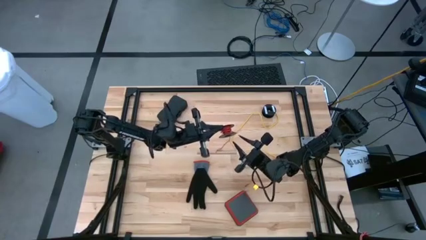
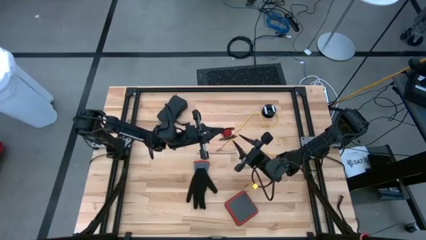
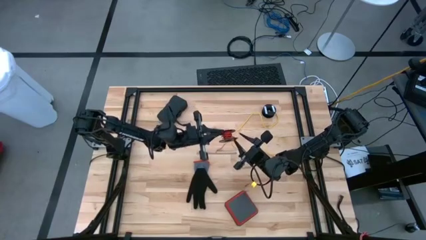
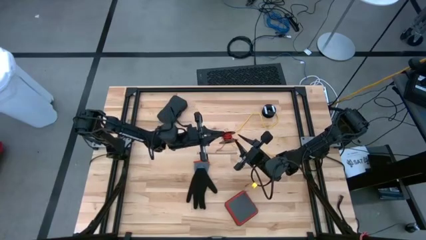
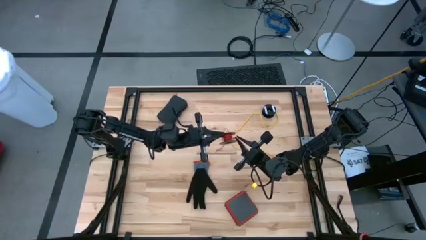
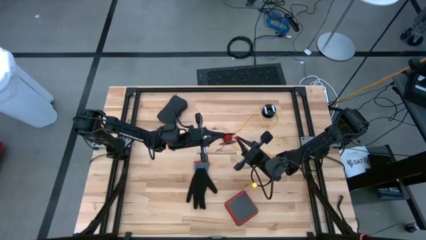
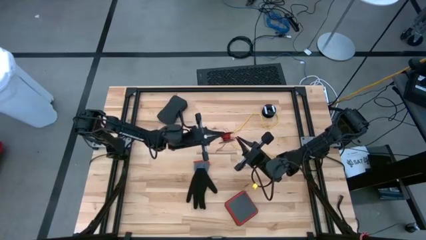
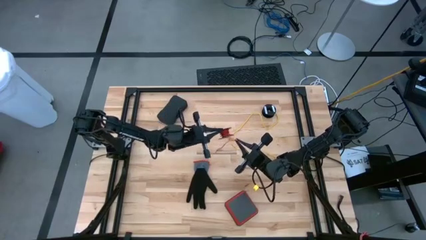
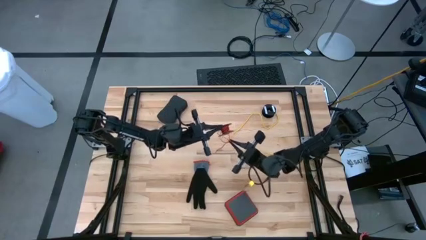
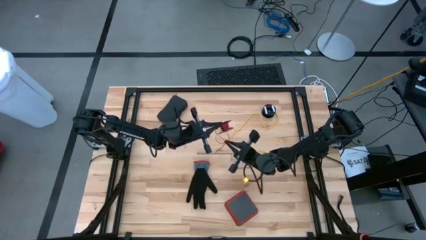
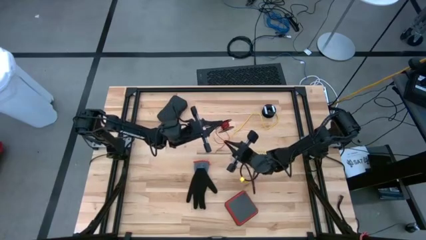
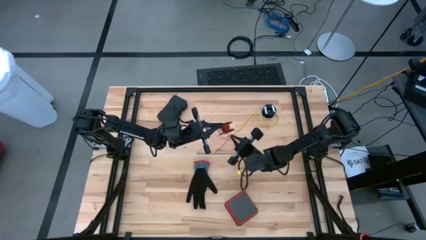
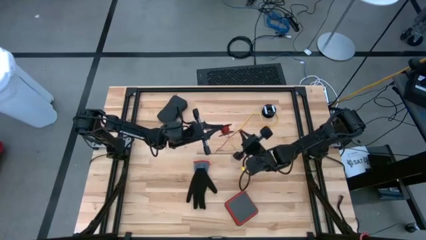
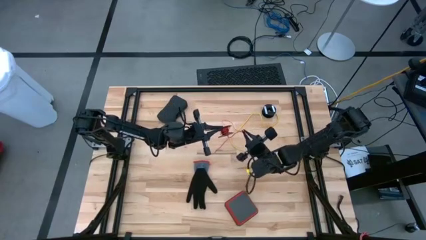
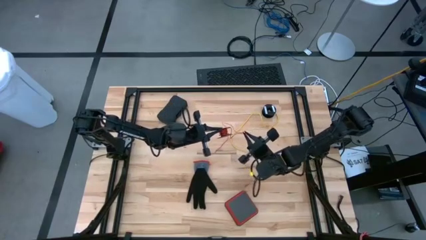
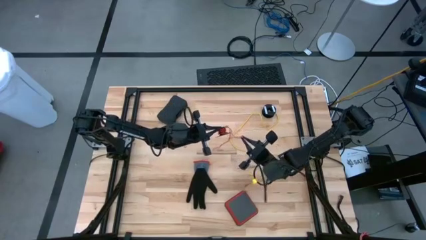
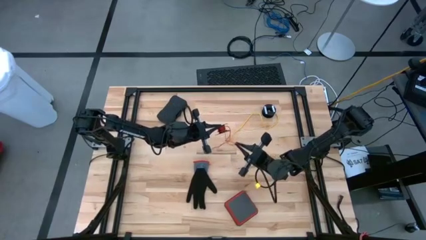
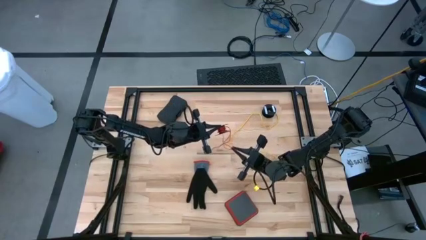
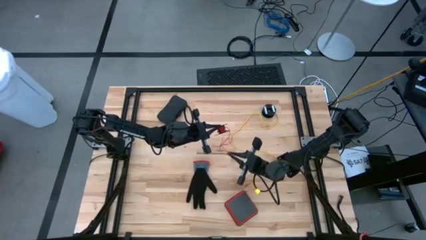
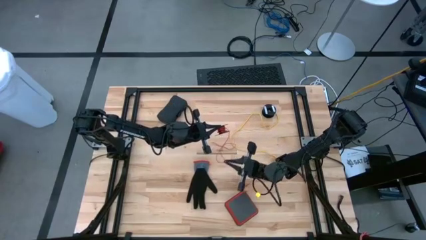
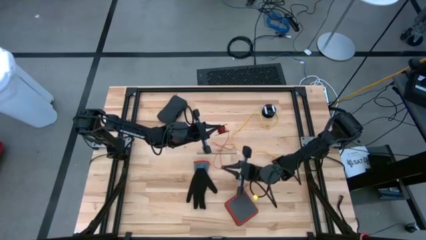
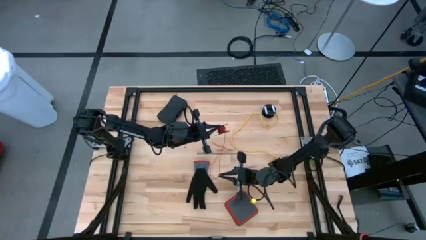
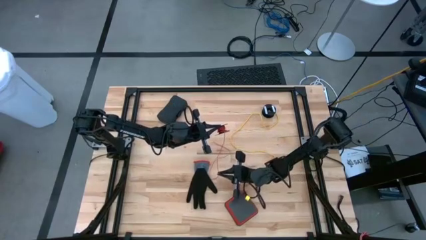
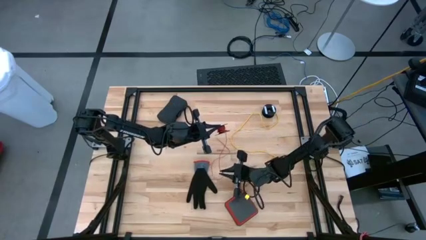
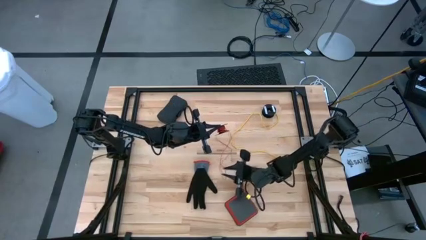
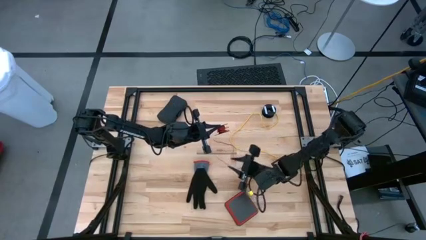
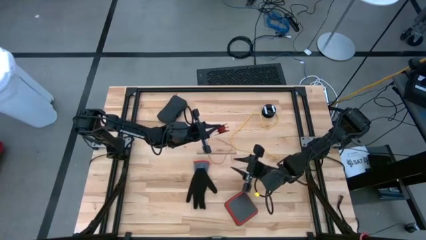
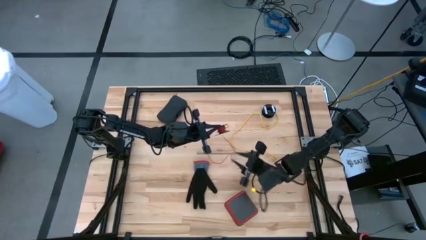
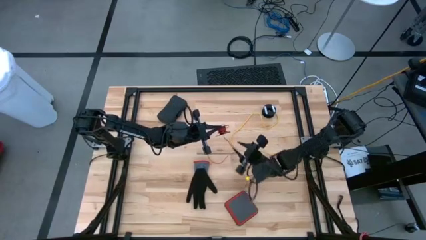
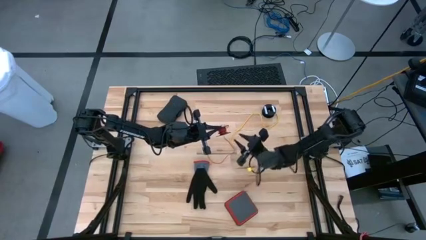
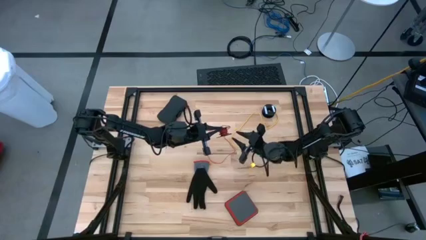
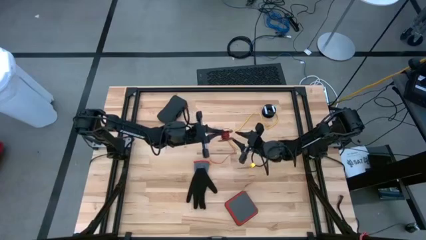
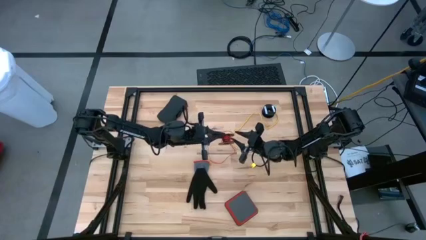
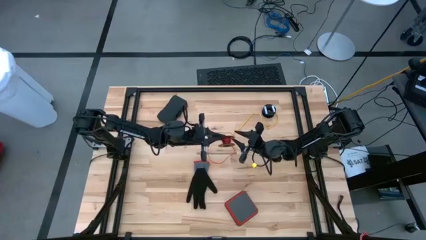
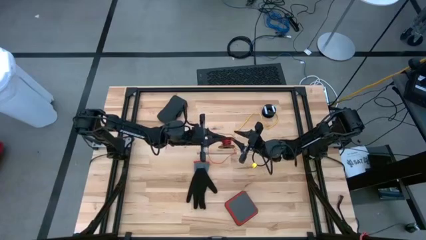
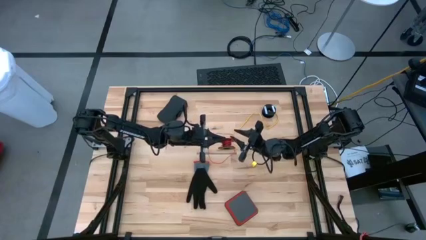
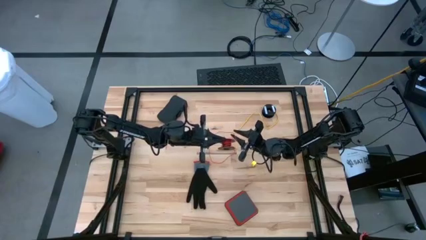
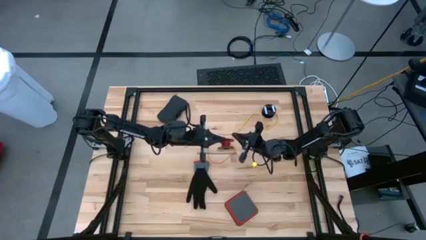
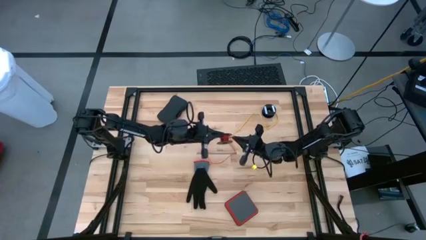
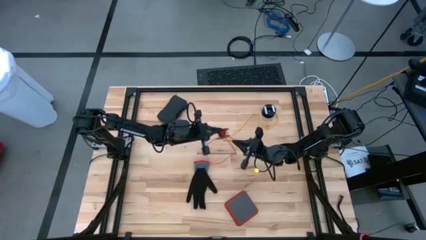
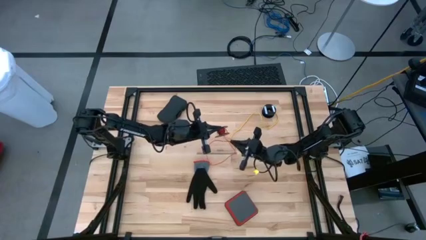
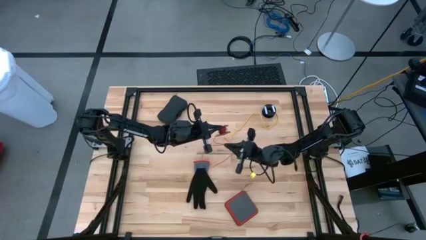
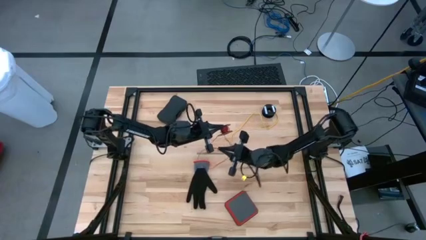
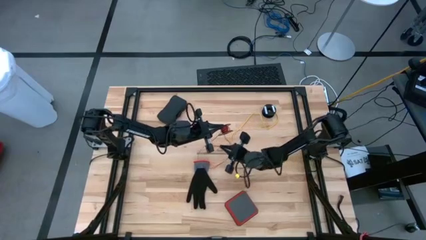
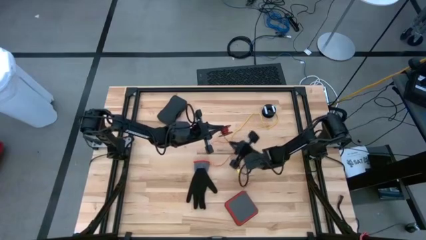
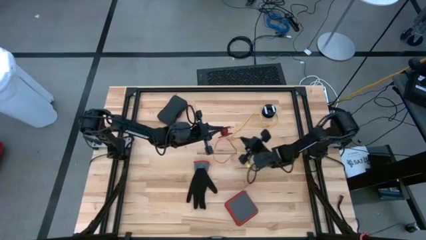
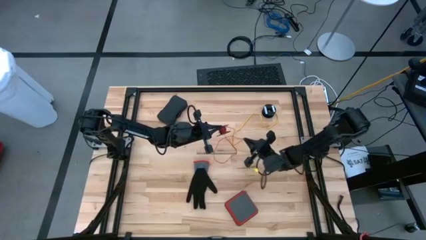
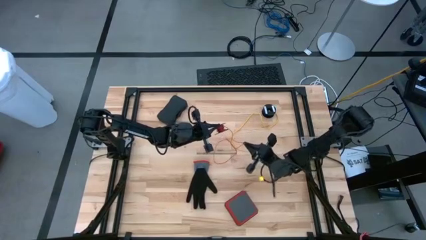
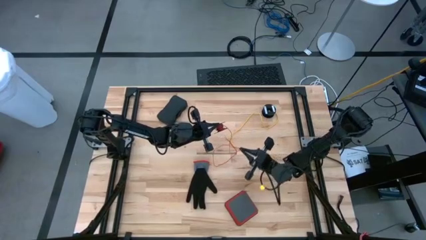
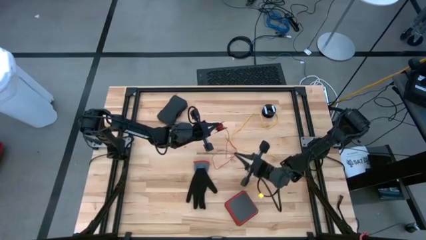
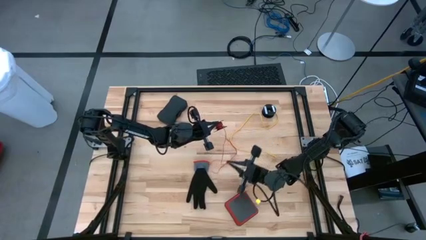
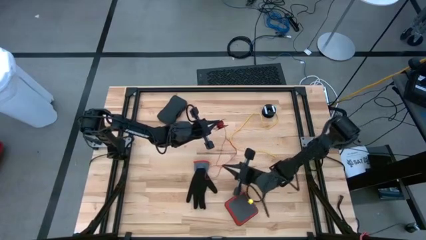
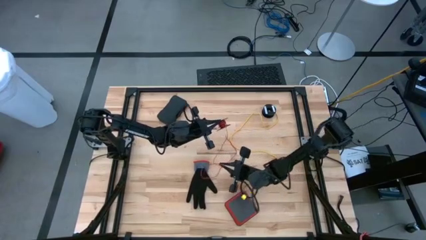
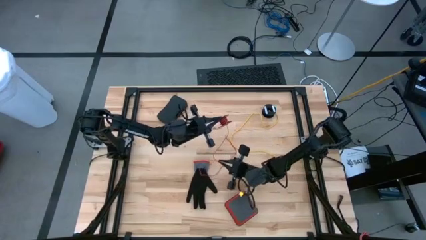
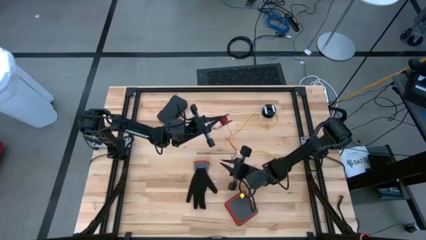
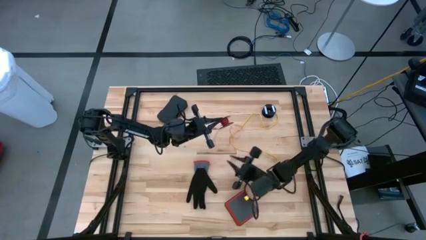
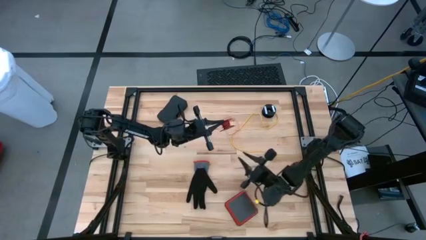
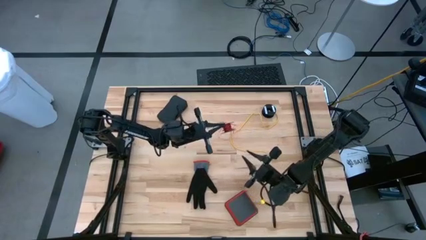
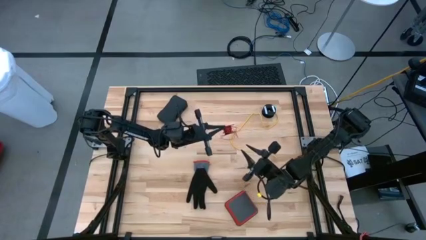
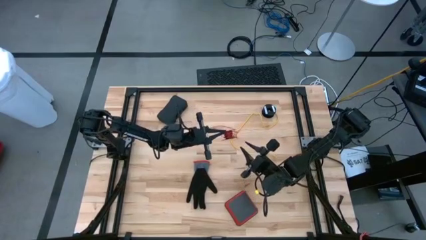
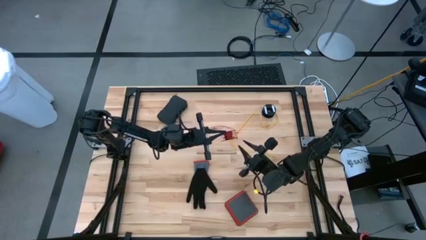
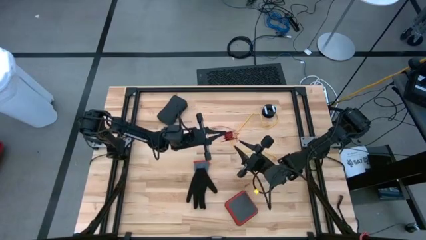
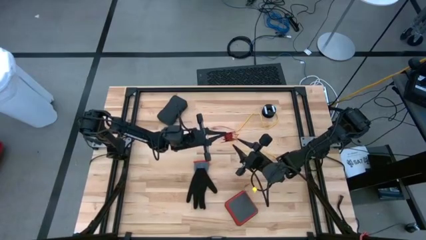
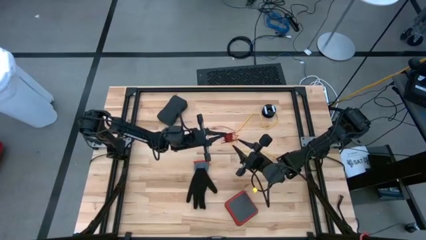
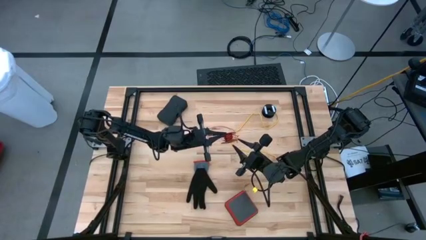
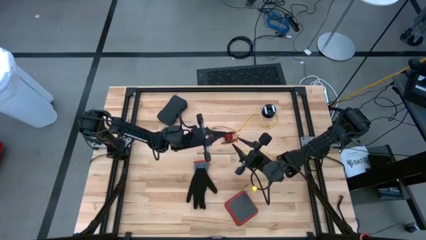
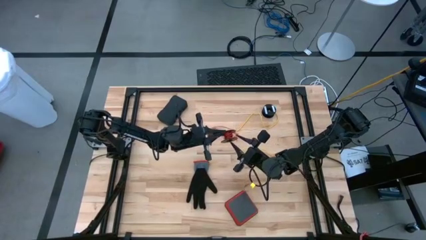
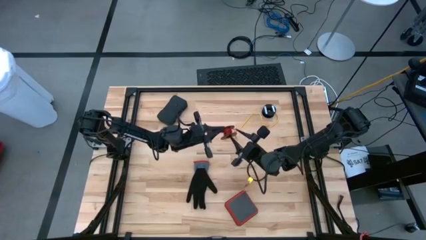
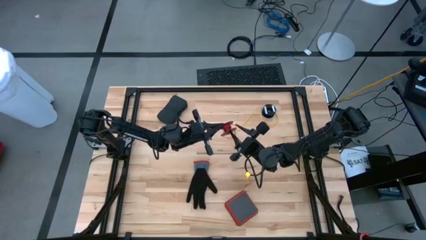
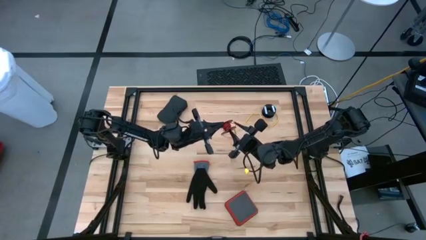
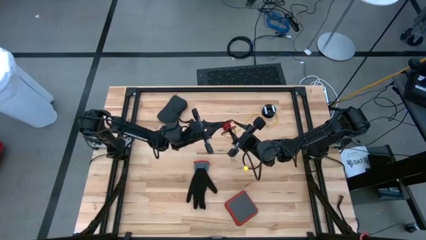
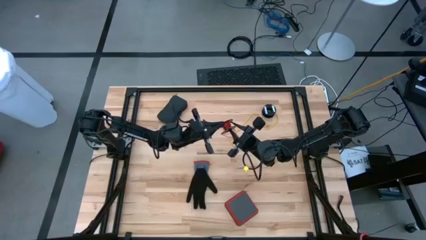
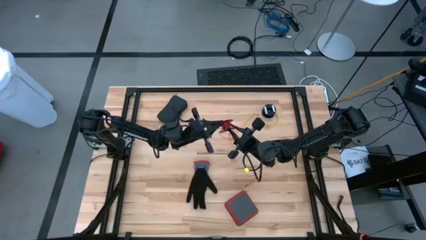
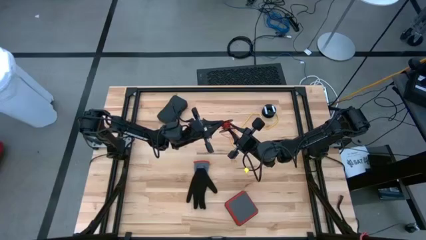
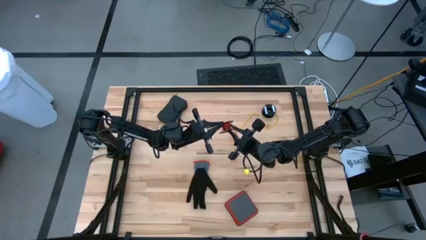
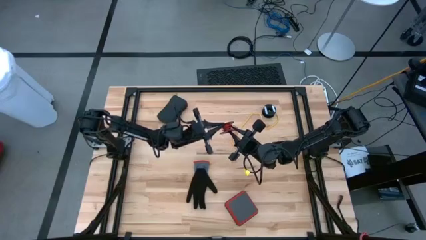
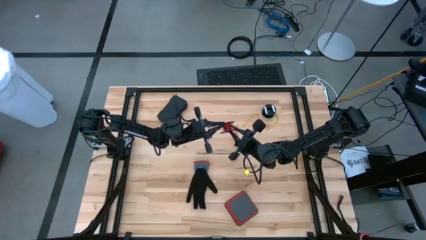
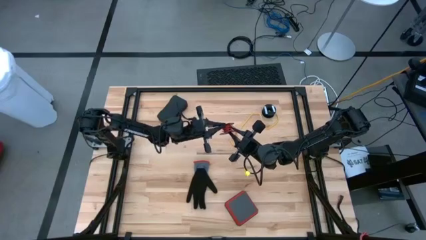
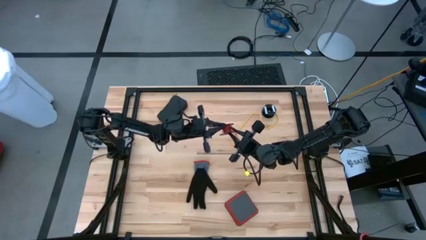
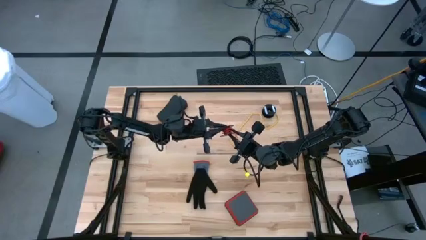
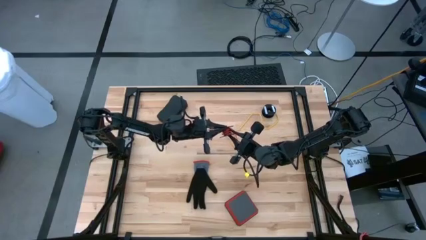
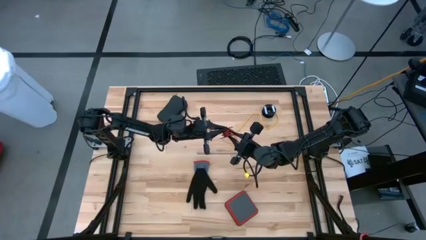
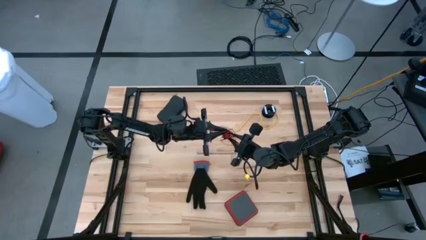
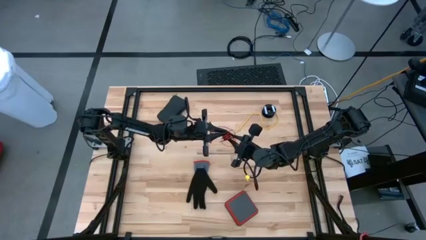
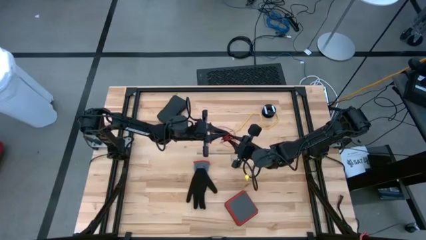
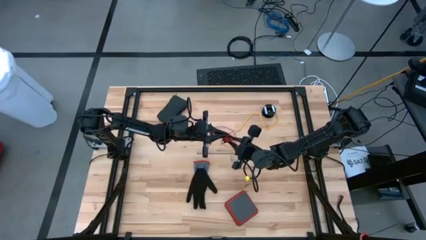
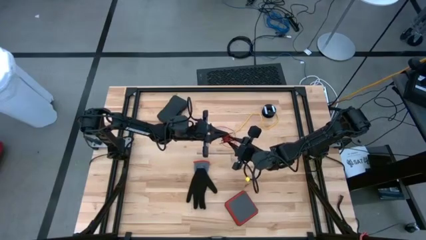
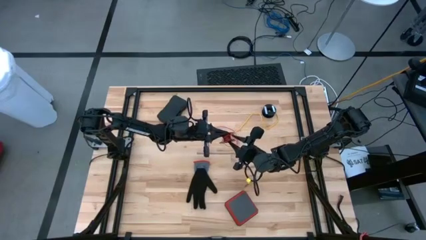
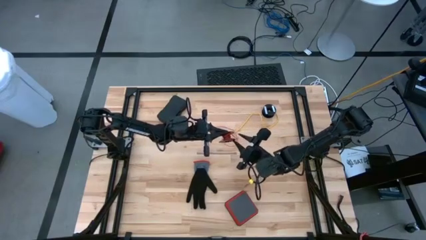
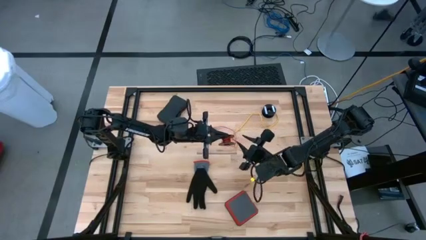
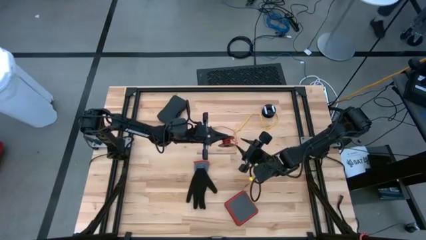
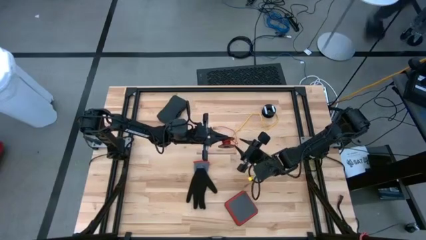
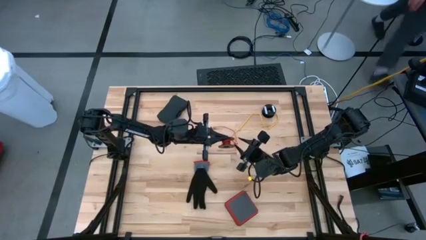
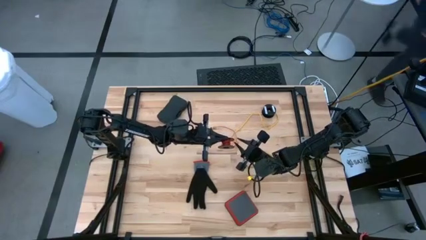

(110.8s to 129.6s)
Task: Coil cords
Uncoil the red wire from the black spool
